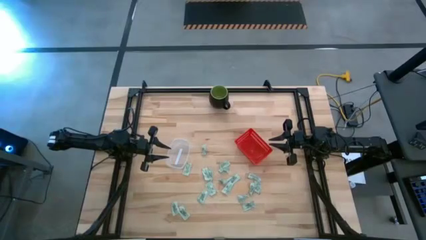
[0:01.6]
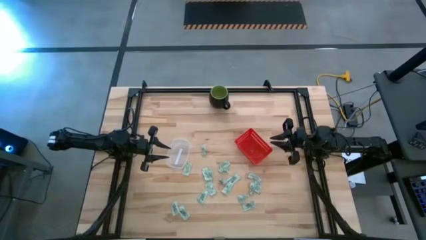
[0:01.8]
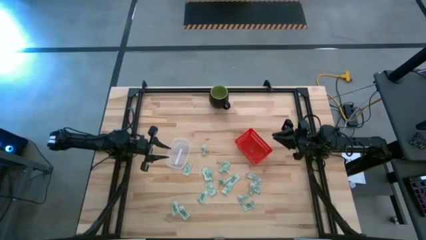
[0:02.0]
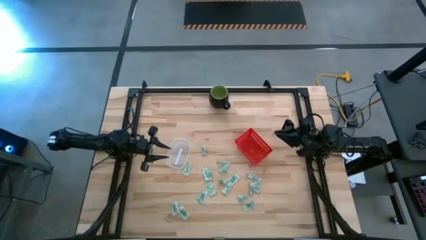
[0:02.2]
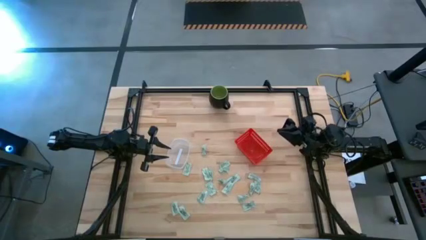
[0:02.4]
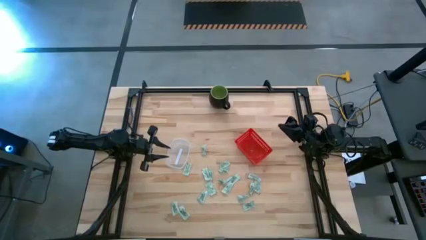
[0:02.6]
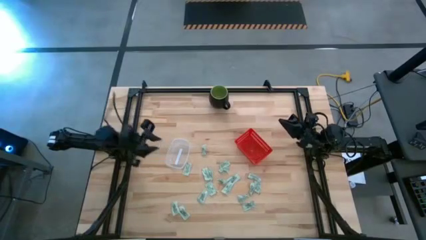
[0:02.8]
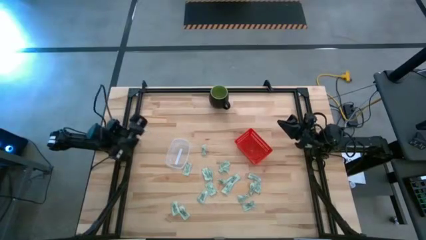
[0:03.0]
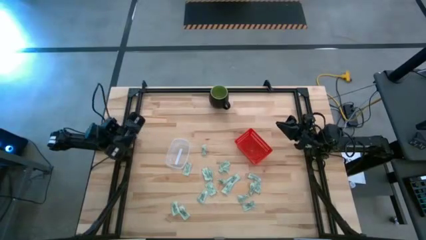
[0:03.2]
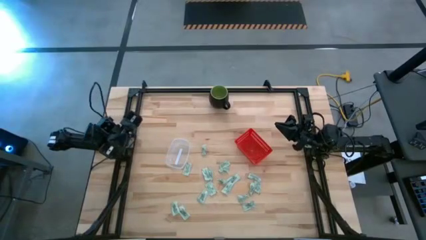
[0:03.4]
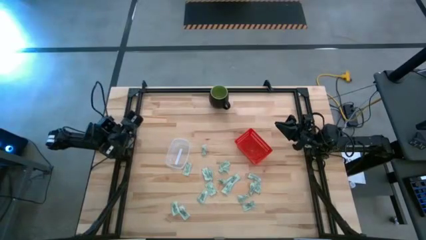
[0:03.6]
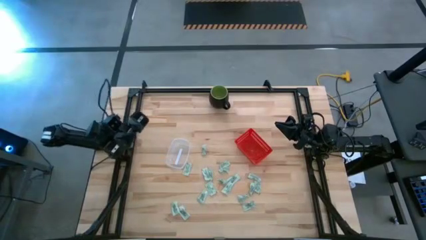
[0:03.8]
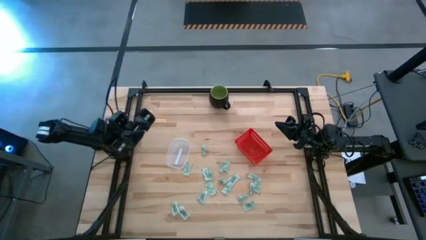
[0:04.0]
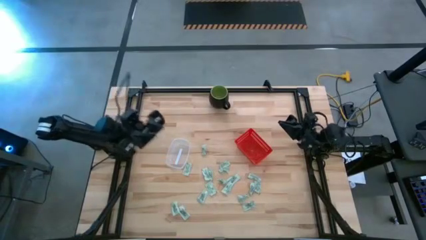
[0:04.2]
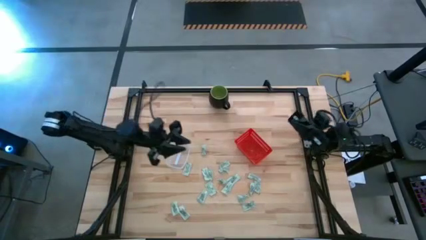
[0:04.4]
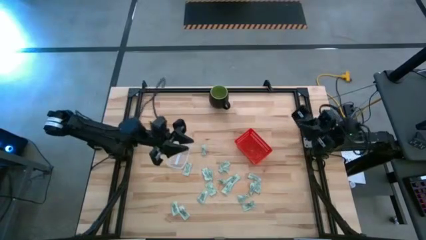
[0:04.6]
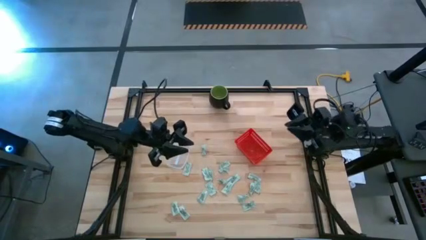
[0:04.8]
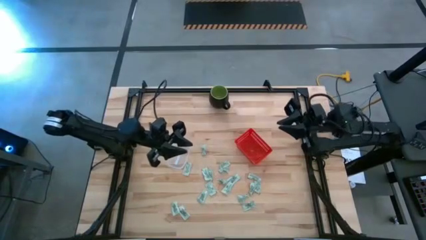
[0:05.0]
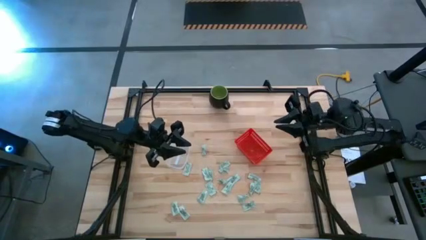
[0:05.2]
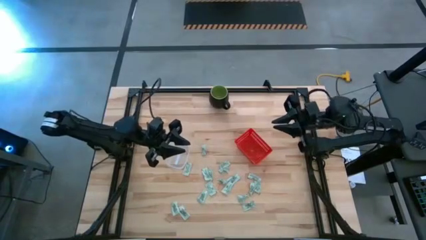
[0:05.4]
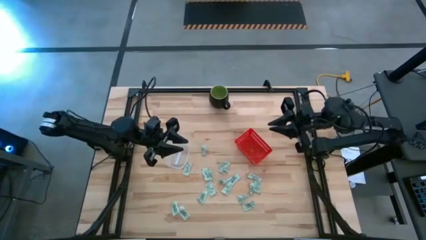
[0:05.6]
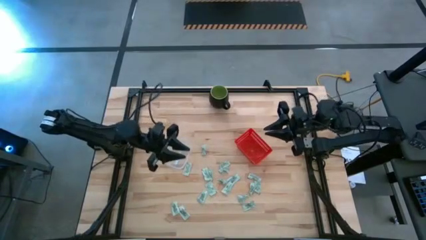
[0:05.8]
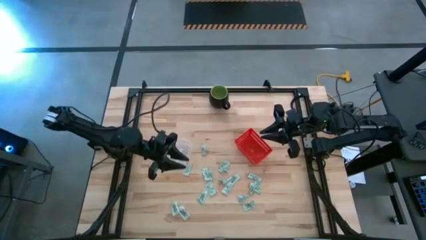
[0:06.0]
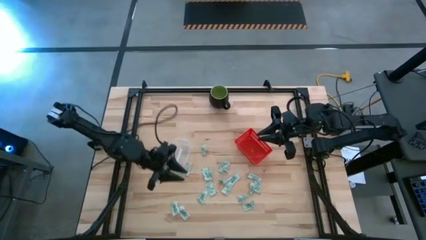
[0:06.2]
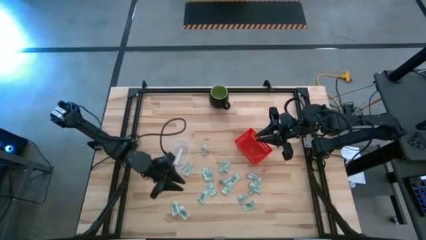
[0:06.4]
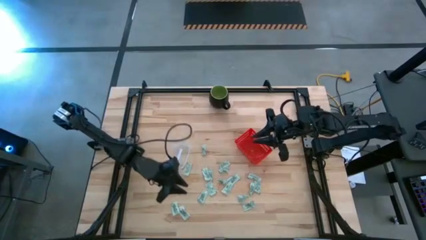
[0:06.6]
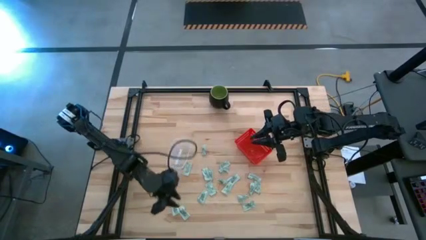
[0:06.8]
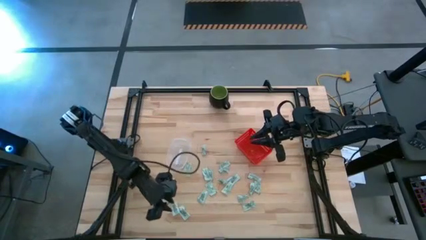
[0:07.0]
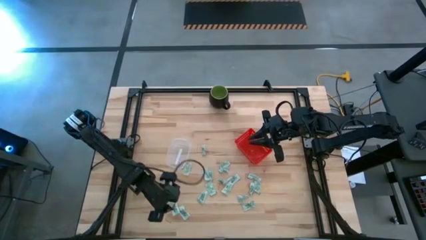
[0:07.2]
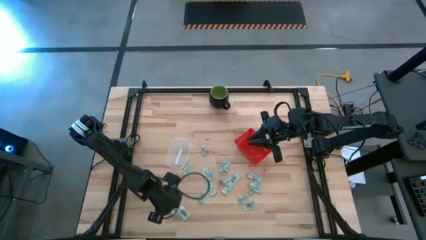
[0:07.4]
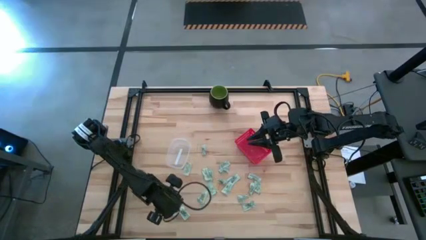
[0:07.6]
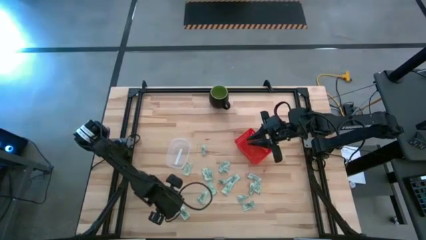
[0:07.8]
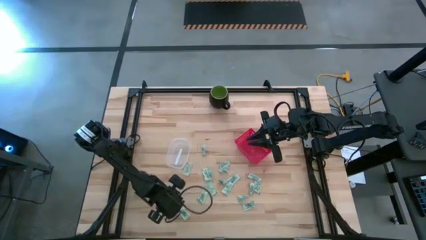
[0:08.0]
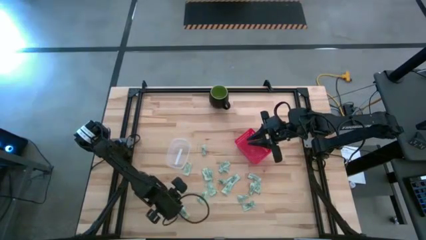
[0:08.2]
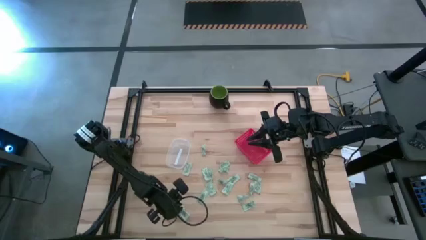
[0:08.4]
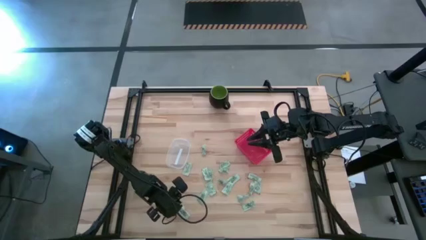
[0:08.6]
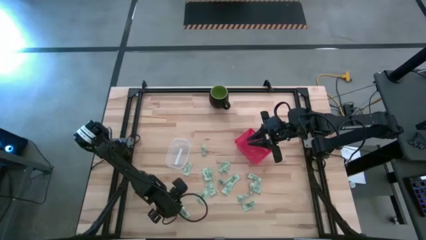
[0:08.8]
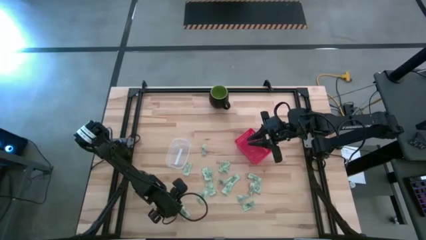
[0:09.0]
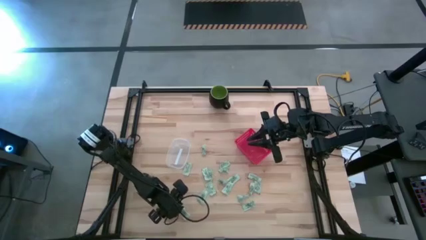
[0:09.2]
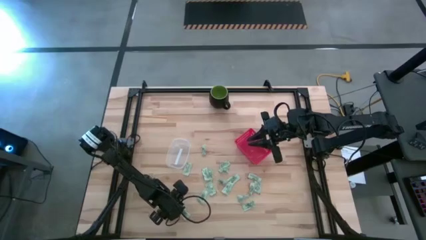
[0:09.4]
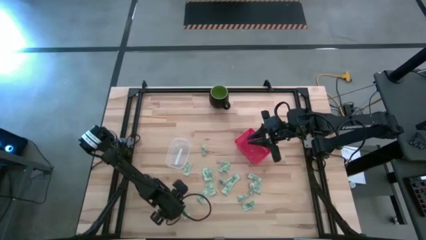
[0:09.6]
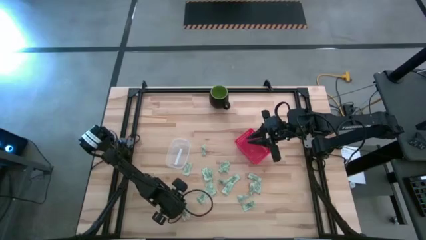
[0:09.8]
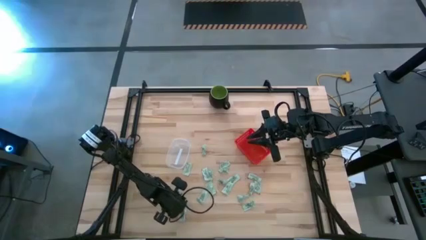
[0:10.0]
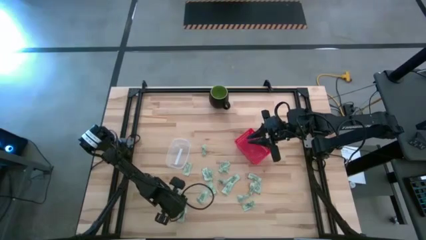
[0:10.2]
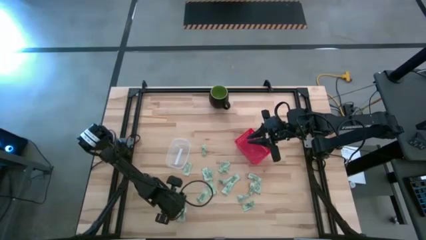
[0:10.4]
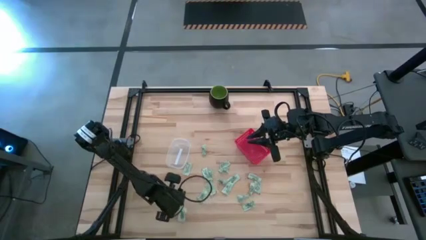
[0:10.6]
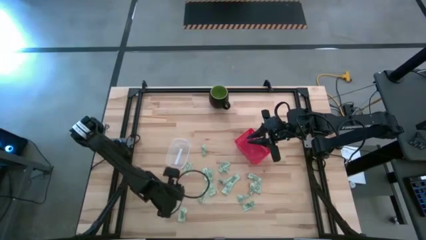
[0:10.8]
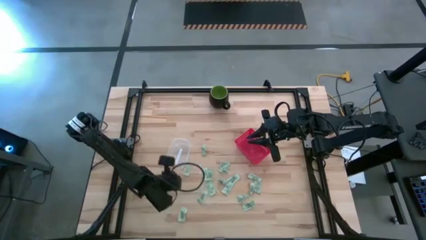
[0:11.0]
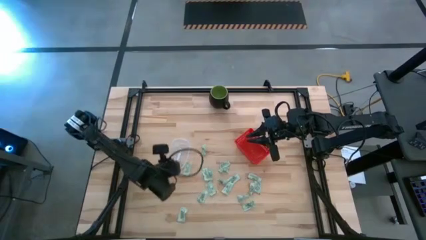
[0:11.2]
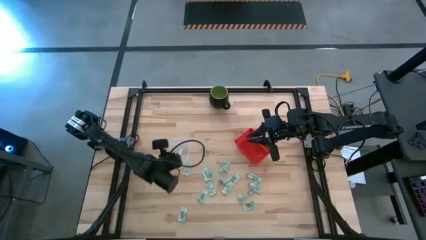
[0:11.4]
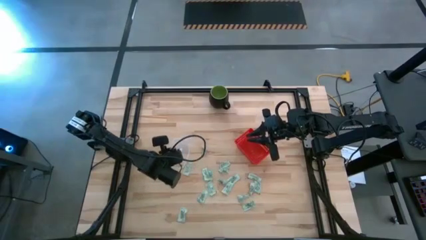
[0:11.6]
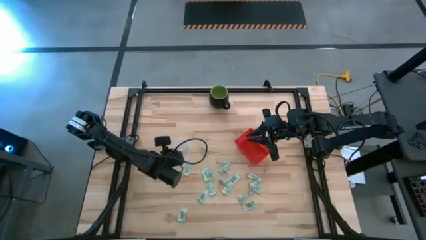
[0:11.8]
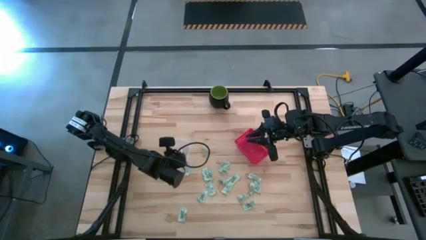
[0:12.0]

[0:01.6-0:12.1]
Task: Pick and place items into bin
Put the stevia packet into the transparent bin

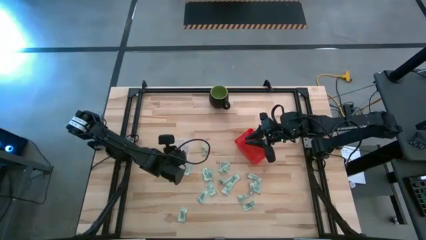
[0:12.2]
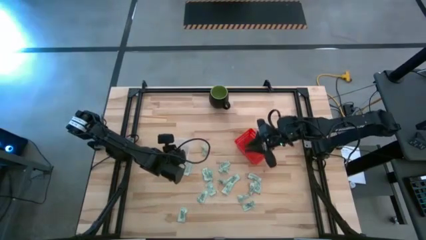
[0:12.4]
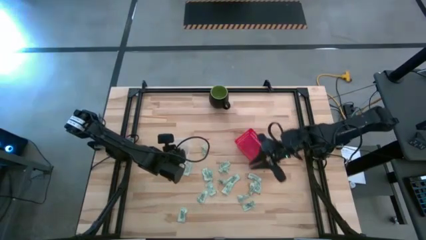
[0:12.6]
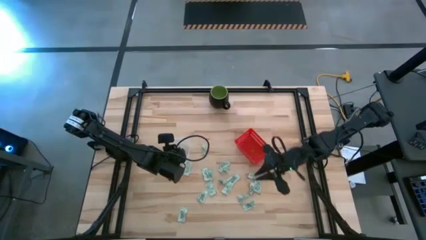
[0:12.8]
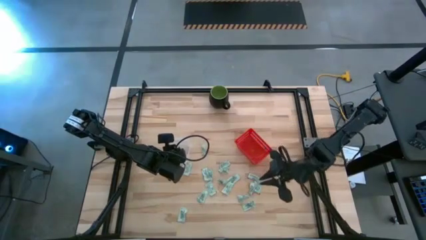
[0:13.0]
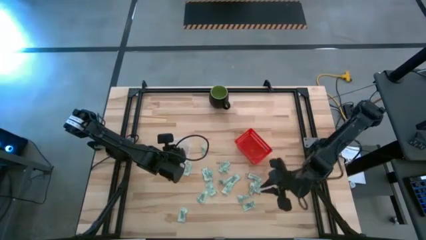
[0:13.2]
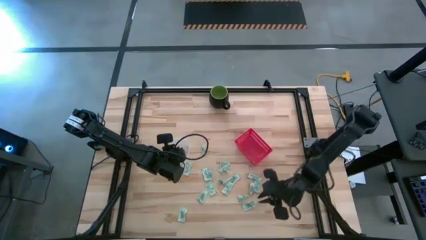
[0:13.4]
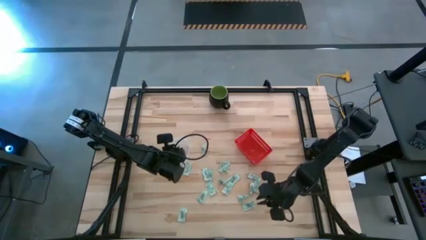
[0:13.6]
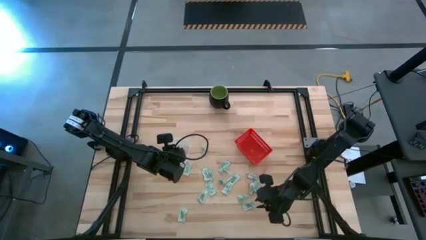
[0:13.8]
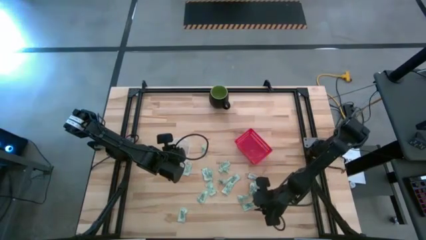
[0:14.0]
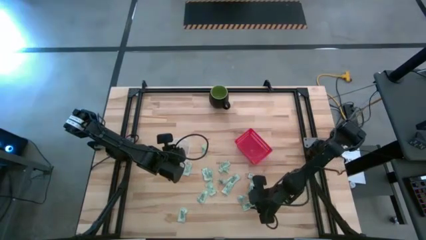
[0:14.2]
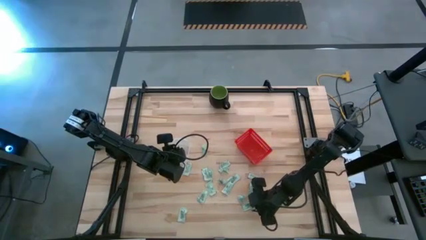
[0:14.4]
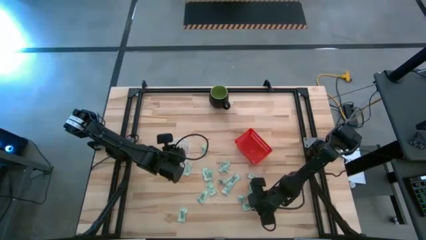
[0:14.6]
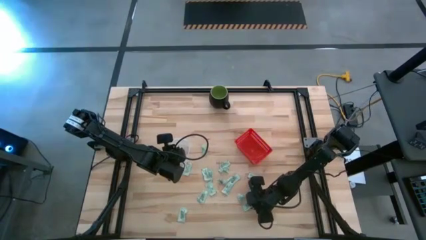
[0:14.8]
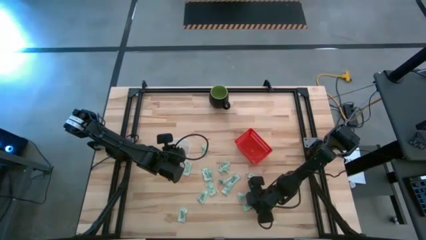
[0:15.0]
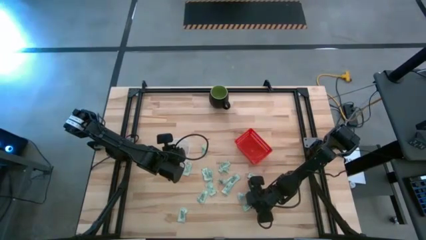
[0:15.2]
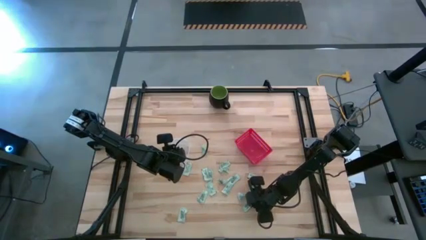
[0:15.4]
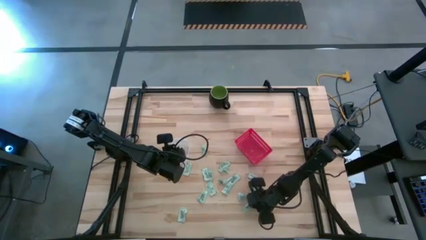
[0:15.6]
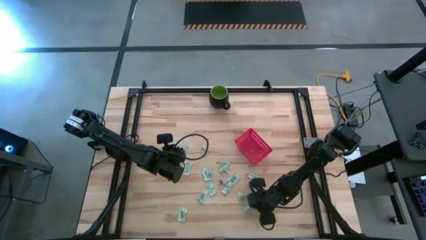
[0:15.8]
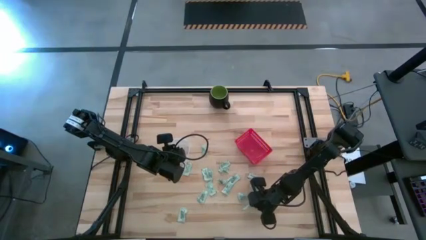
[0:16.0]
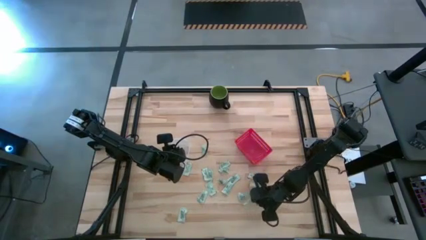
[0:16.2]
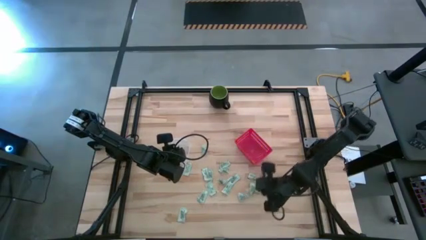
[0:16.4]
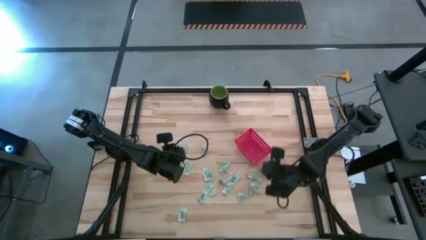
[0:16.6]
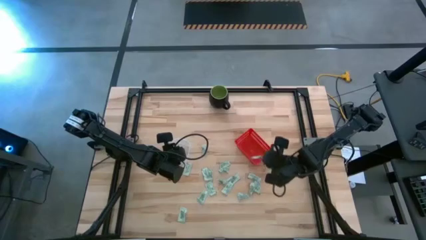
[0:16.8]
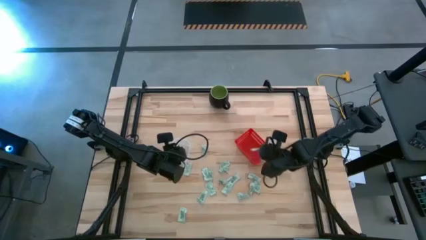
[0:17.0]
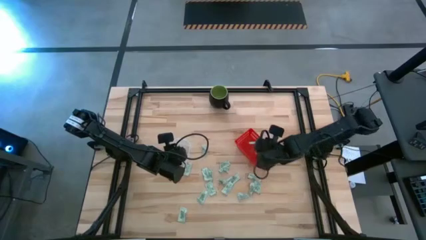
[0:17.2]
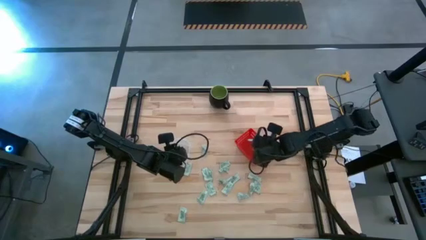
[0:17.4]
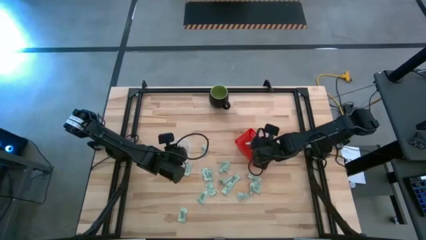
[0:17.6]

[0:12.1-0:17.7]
Put the stevia packet into the red basket
